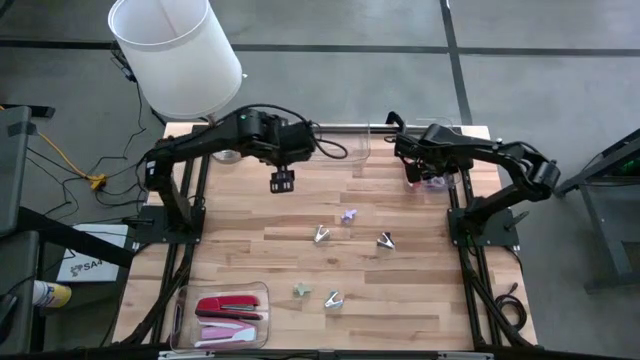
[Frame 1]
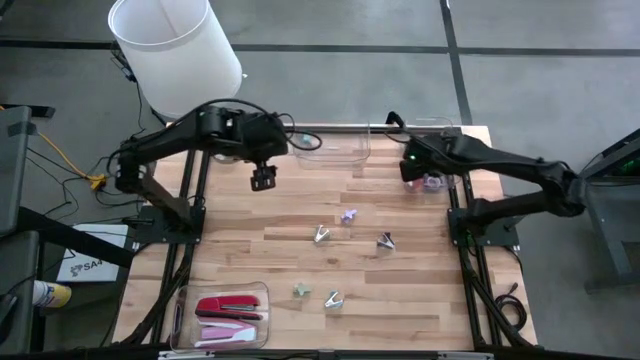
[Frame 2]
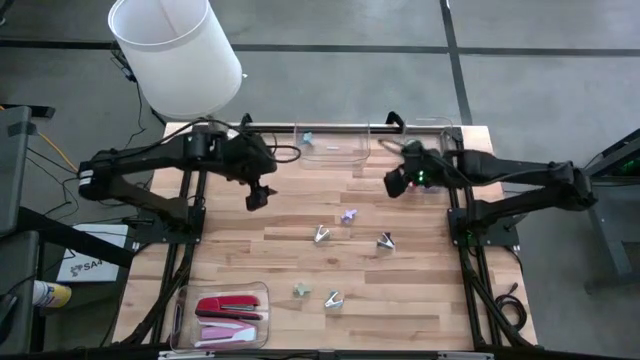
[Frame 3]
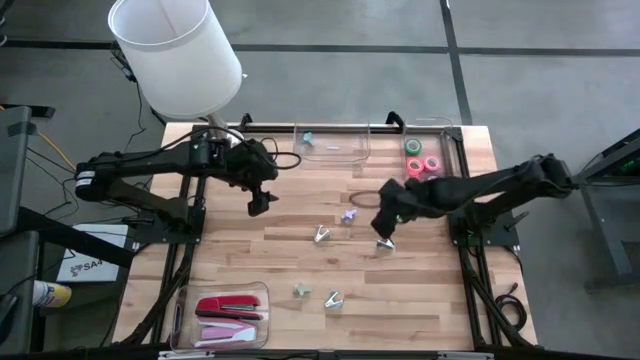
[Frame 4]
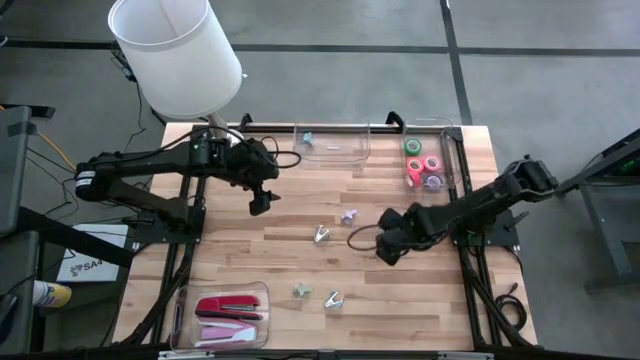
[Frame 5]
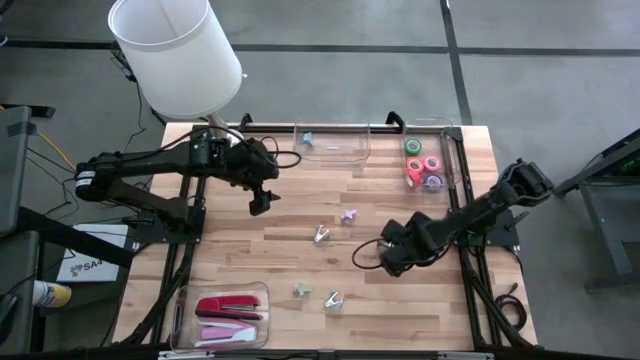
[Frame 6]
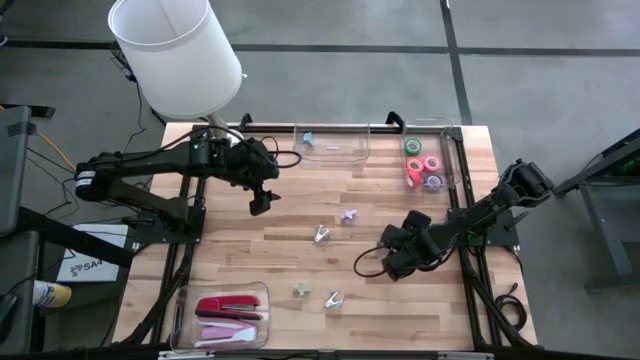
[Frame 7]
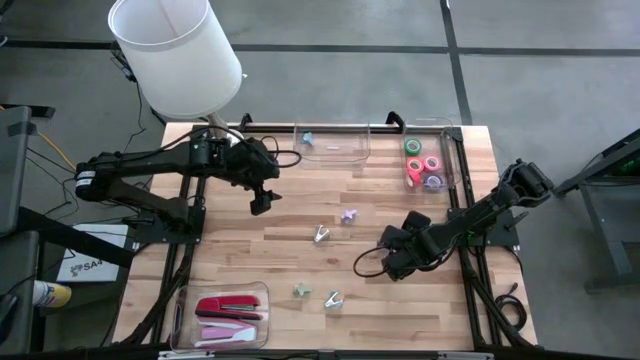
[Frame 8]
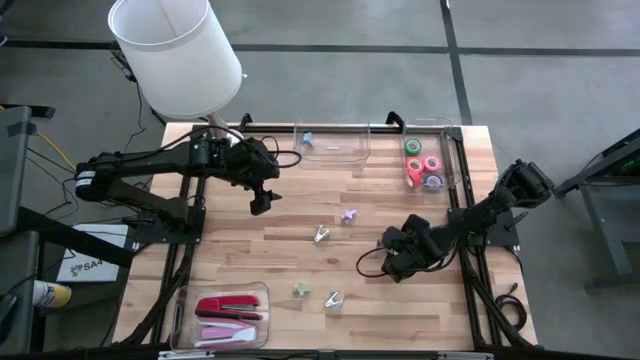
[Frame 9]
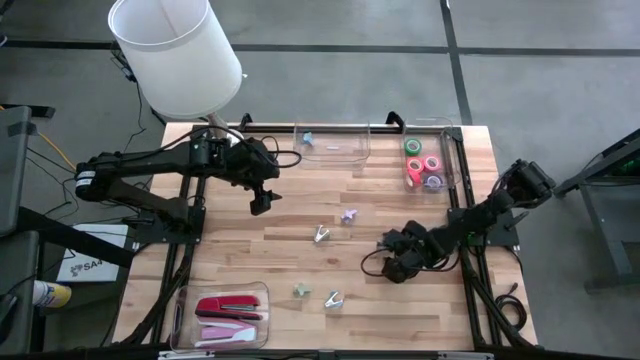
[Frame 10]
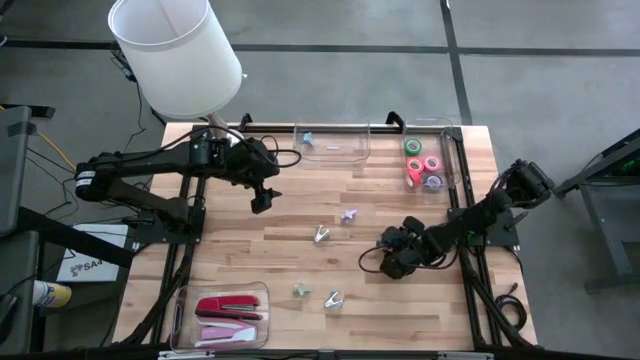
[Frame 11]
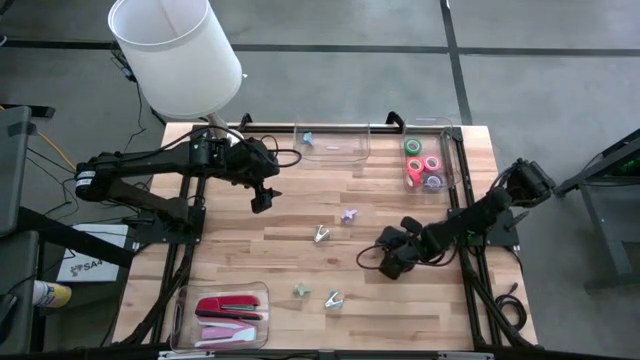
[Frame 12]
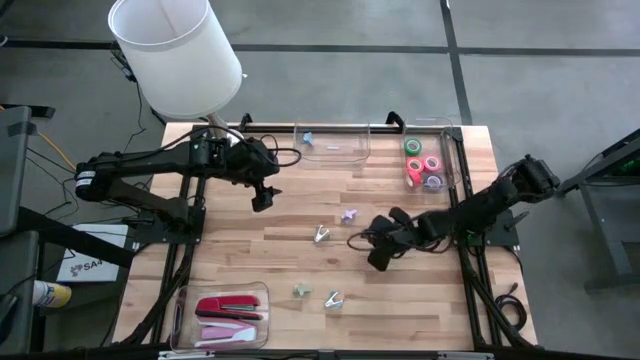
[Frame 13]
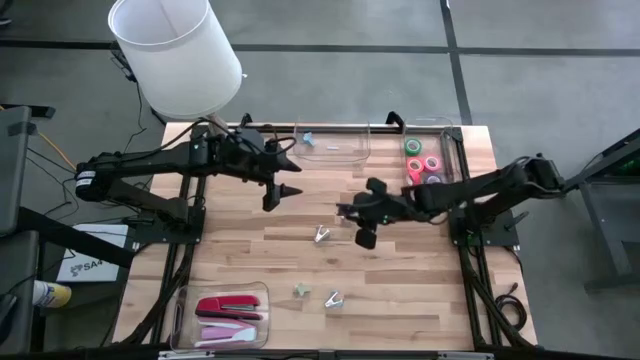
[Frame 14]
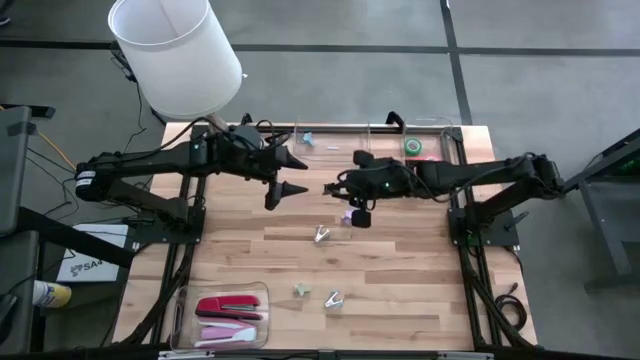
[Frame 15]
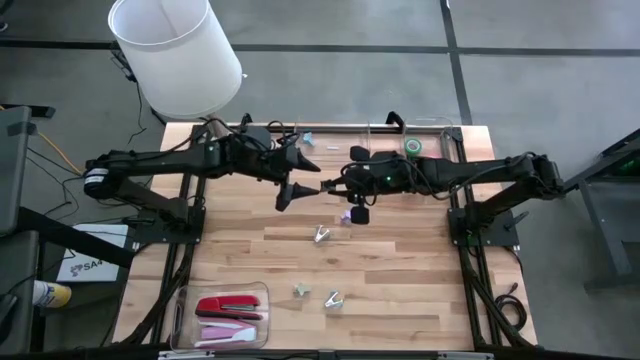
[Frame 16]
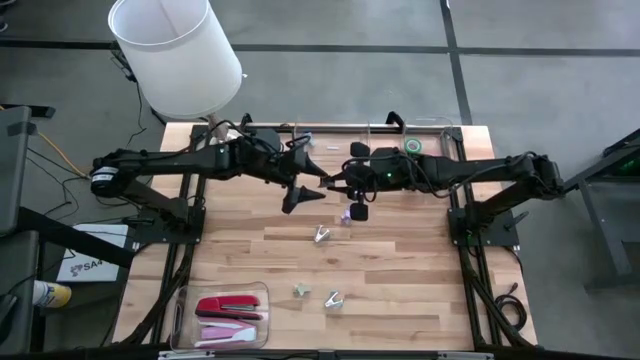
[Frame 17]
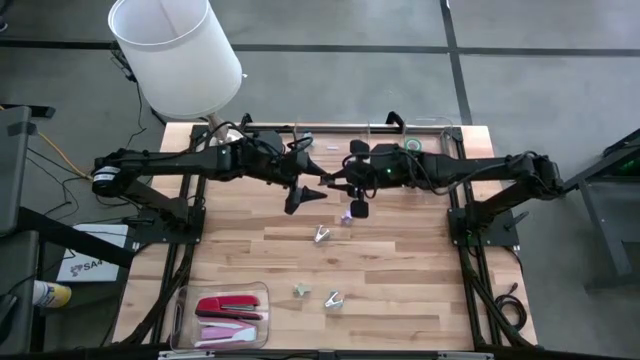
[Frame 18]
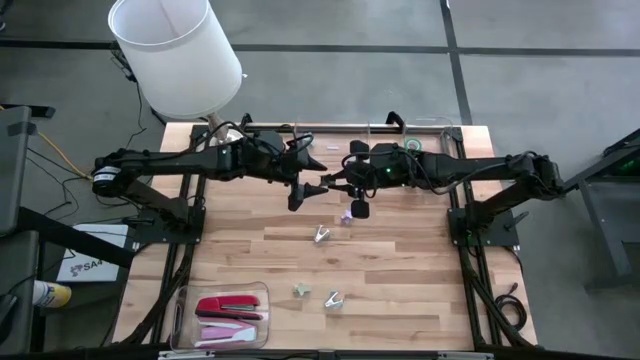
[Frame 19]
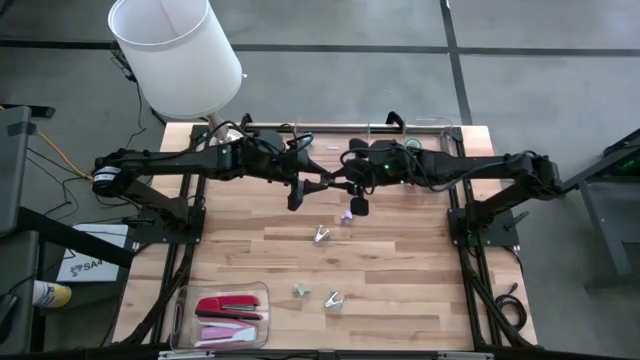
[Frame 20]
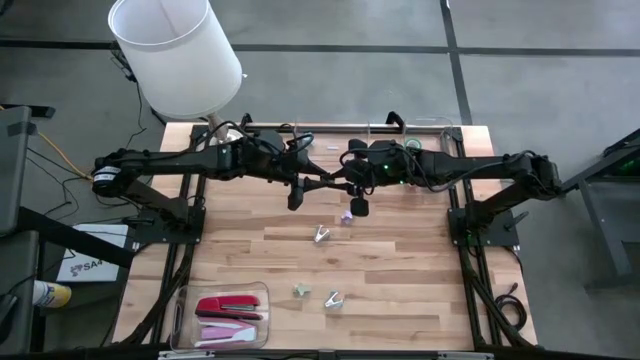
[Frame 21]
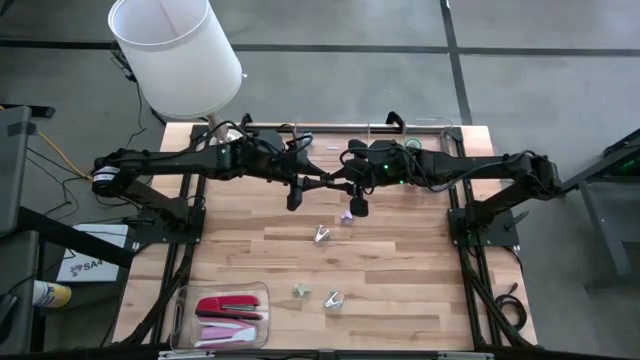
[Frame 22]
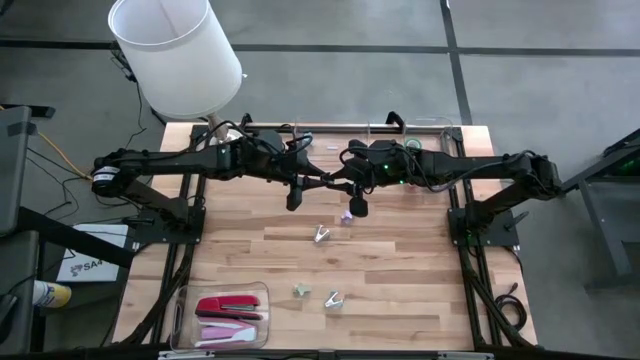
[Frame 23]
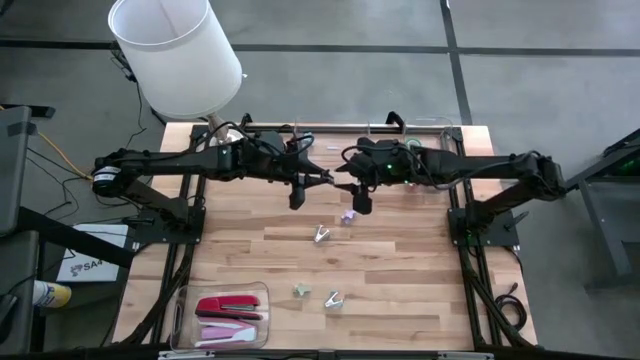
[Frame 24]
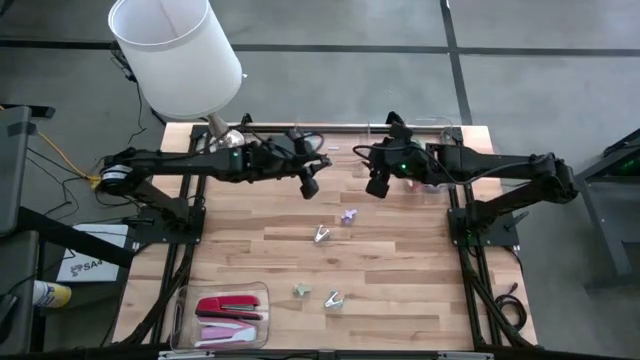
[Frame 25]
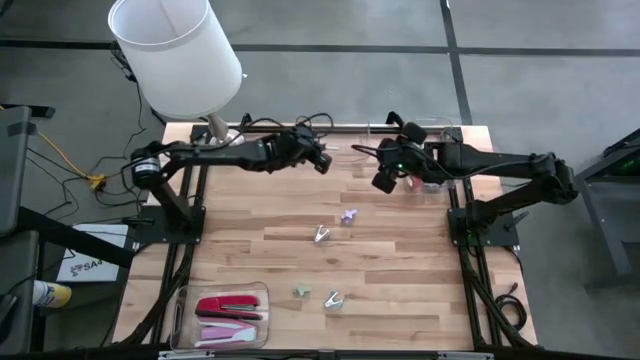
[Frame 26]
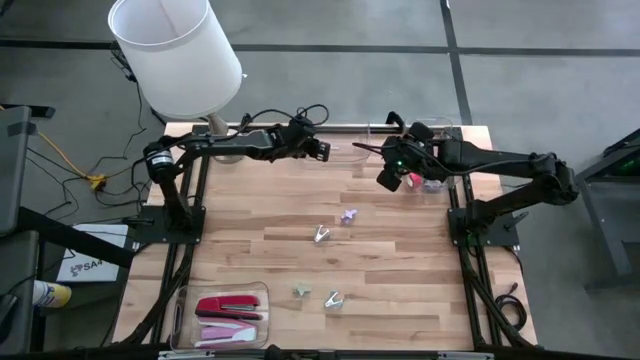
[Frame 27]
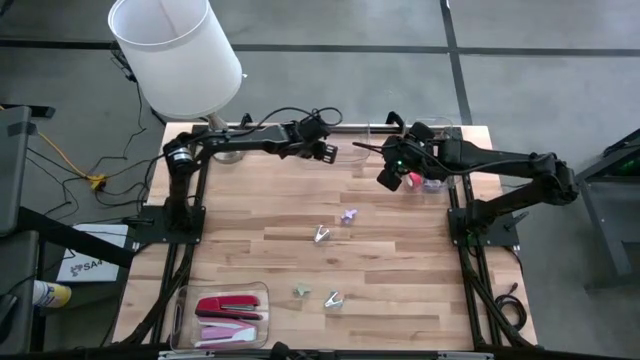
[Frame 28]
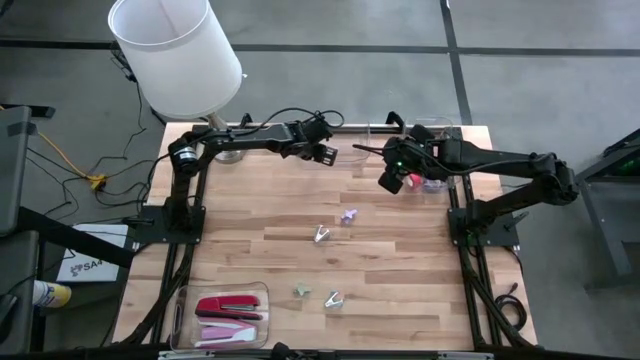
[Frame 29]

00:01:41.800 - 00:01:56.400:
Task: Pick and place Stapler, Stapler remover, tape
Put the black staple remover into the top left transparent bin

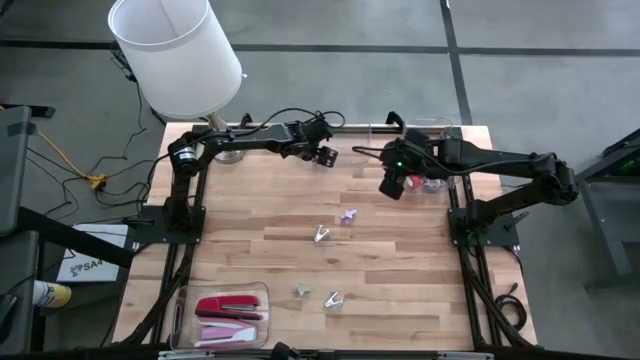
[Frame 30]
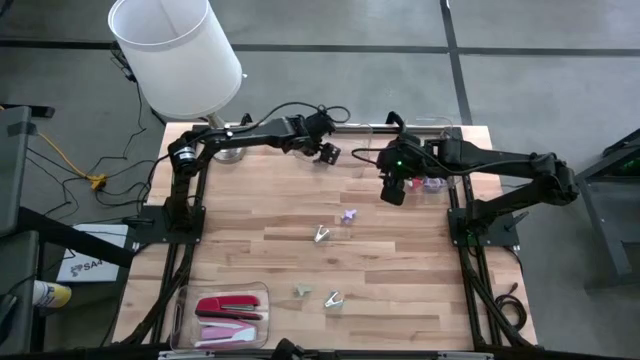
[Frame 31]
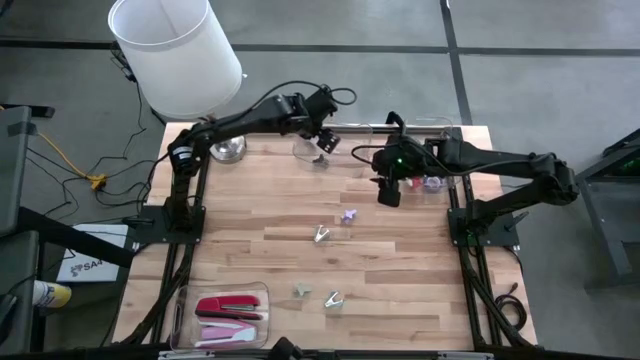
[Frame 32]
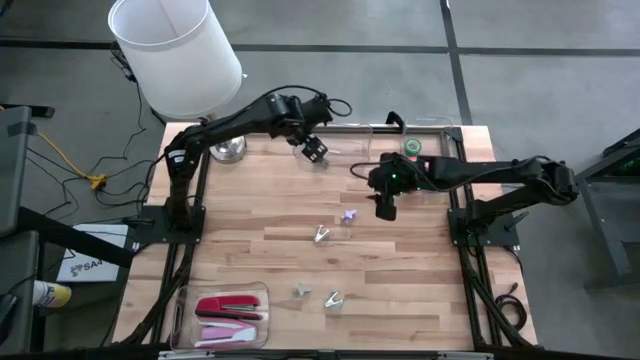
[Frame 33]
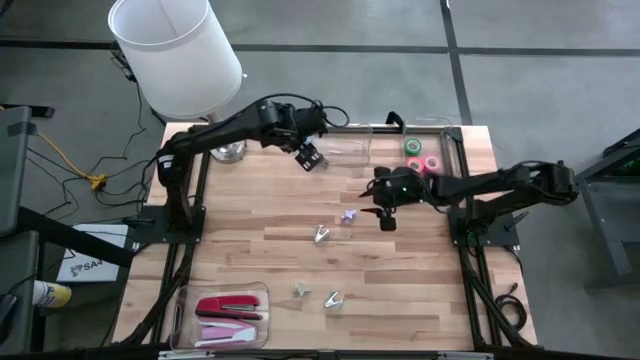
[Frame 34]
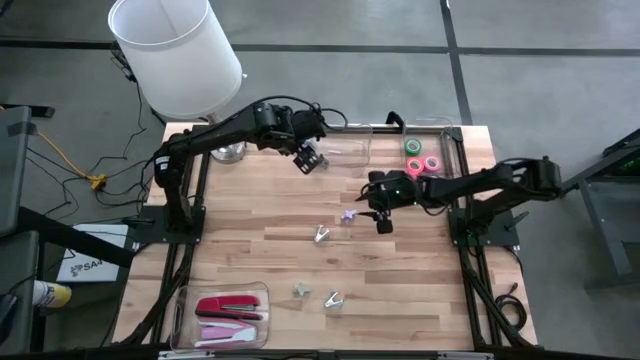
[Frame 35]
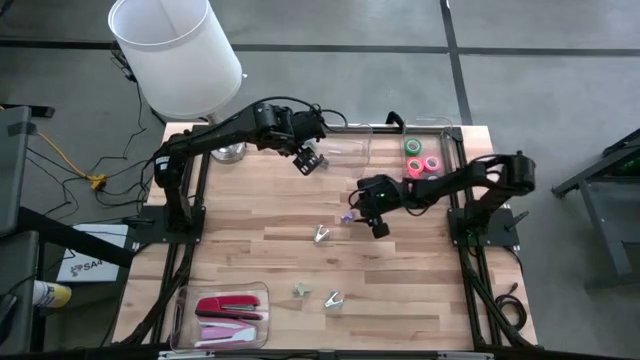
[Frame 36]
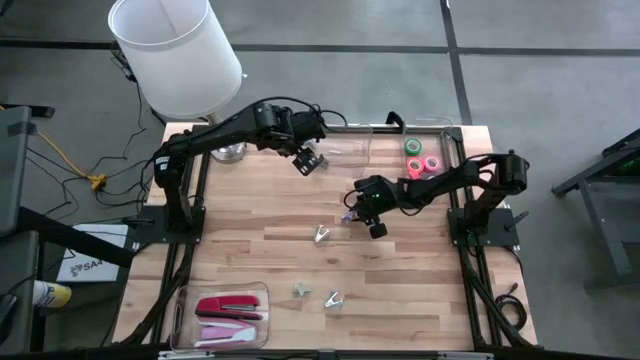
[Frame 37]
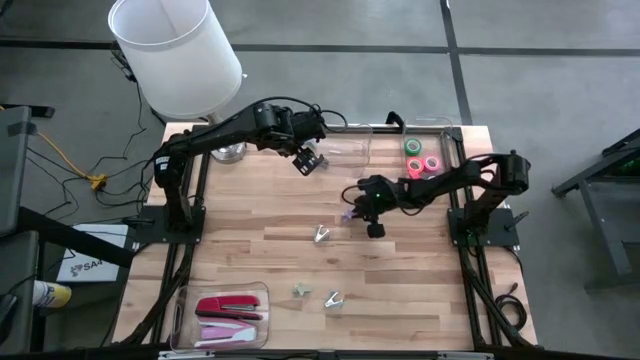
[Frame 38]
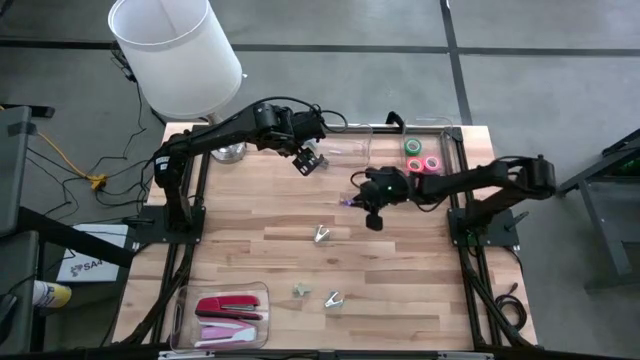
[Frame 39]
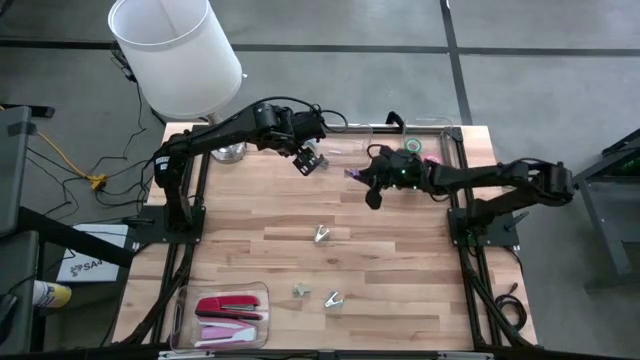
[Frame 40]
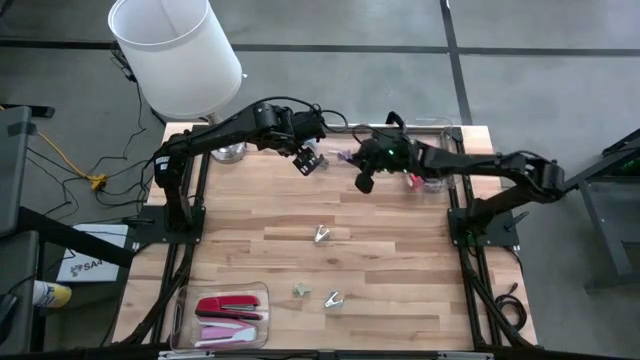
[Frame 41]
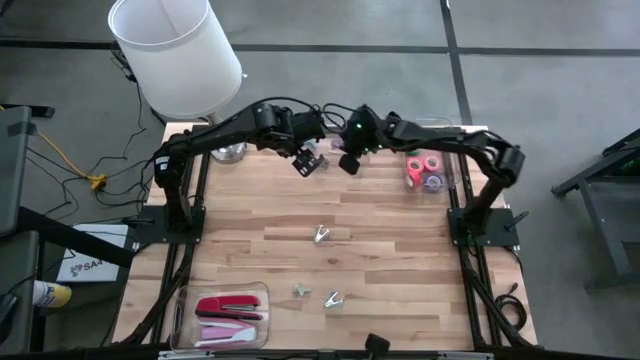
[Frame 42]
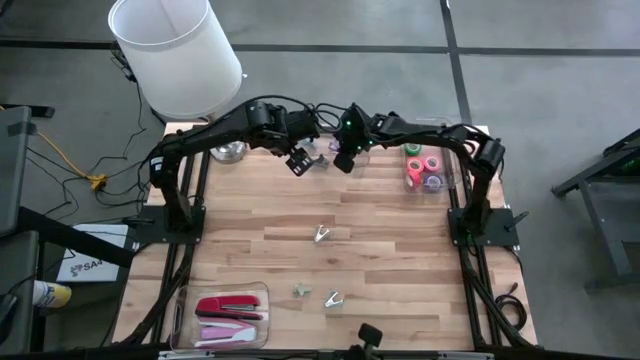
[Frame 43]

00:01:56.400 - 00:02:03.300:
Put the purple staple remover into the top left transparent bin

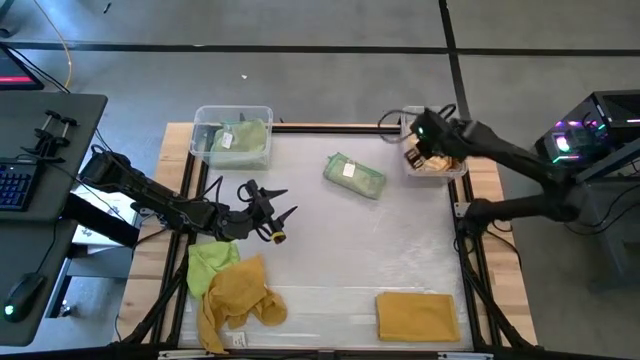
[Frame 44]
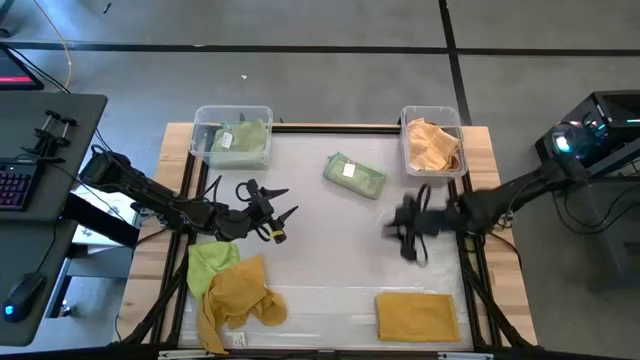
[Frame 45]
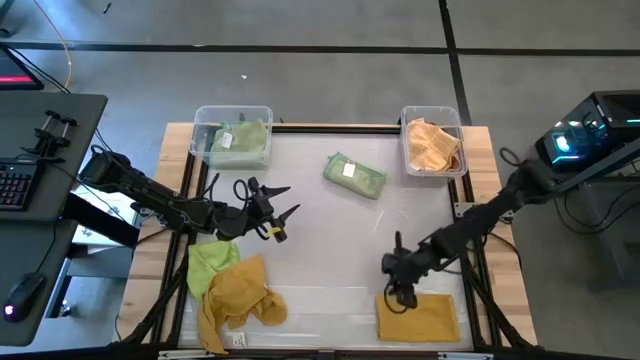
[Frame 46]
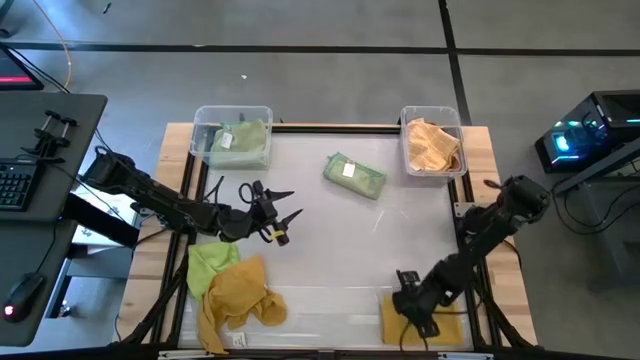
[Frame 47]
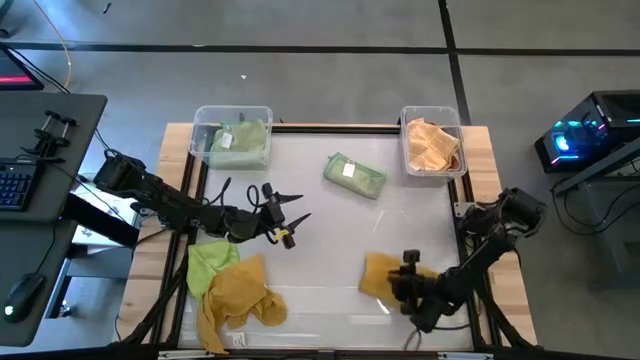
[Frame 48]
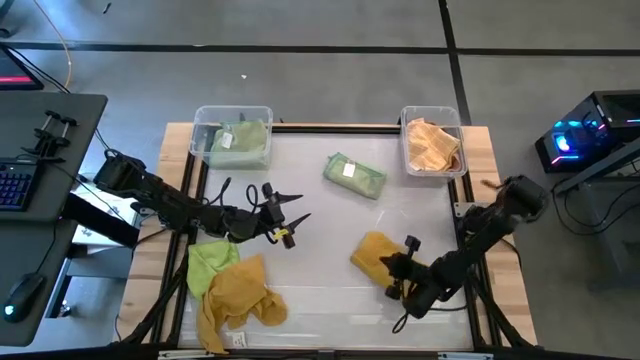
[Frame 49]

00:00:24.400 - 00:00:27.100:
Task: Sort towels by color in basket
Put the right yellow kitchen towel into the right transparent bin
